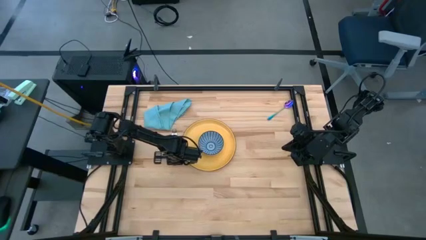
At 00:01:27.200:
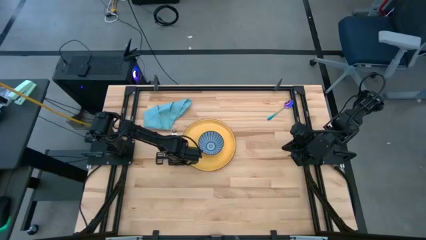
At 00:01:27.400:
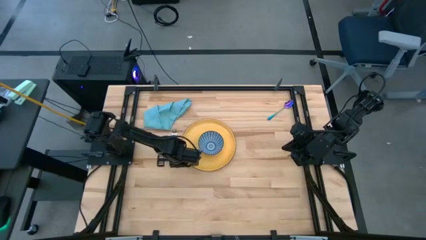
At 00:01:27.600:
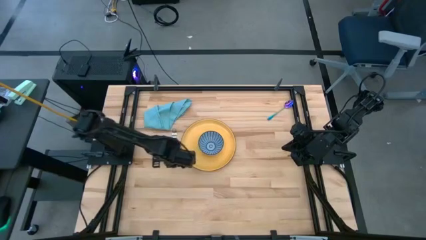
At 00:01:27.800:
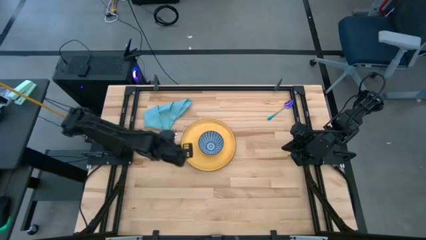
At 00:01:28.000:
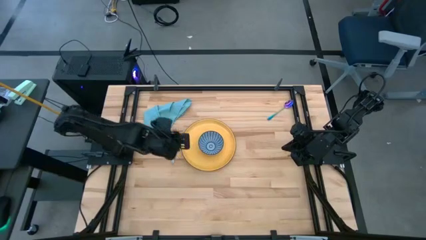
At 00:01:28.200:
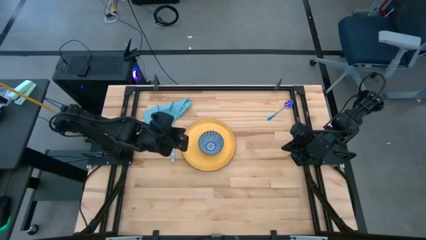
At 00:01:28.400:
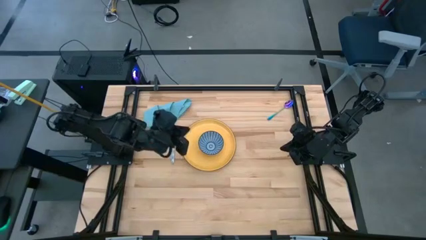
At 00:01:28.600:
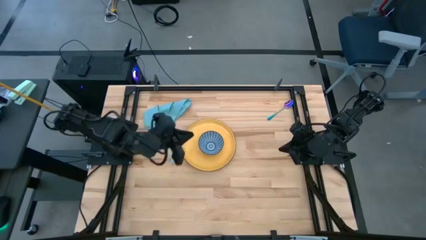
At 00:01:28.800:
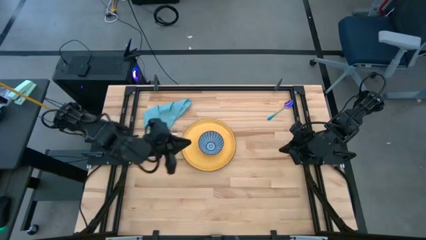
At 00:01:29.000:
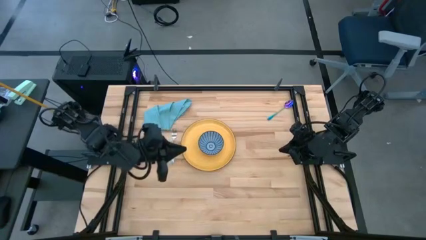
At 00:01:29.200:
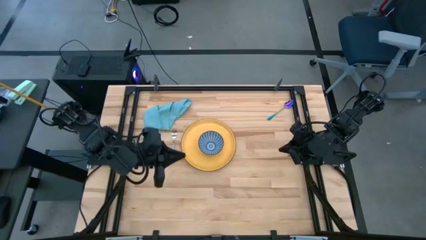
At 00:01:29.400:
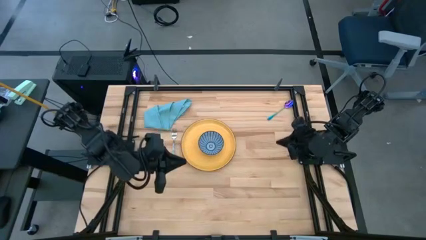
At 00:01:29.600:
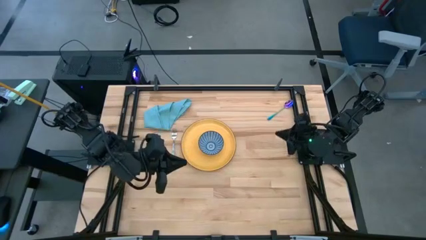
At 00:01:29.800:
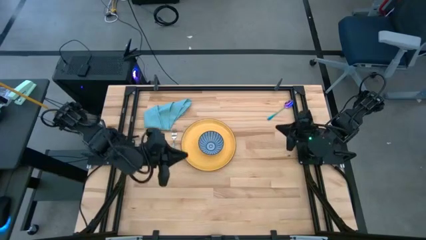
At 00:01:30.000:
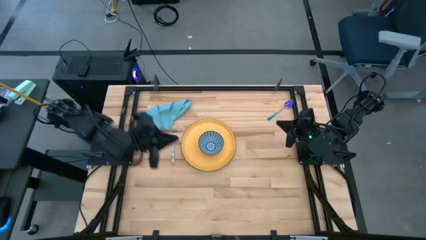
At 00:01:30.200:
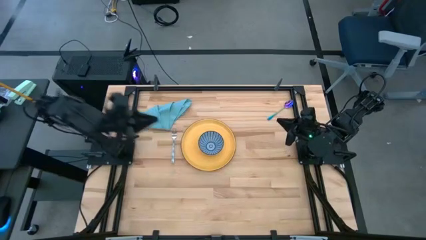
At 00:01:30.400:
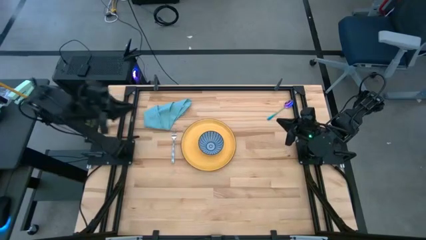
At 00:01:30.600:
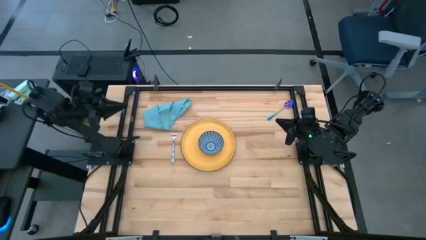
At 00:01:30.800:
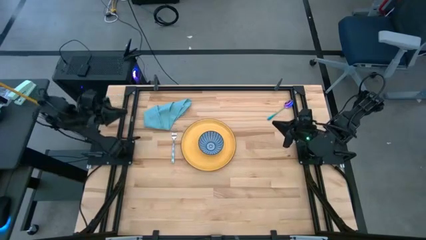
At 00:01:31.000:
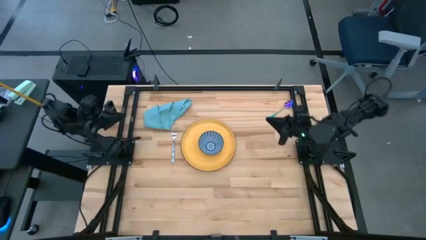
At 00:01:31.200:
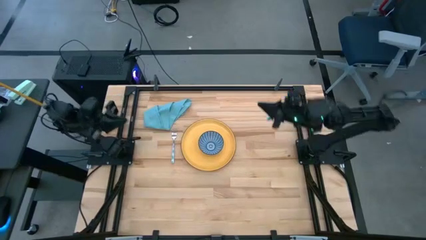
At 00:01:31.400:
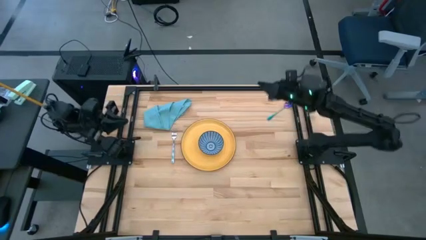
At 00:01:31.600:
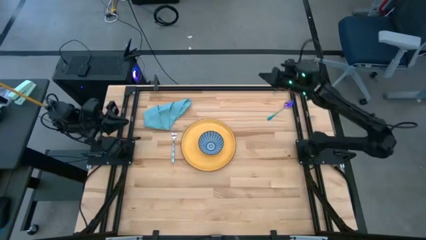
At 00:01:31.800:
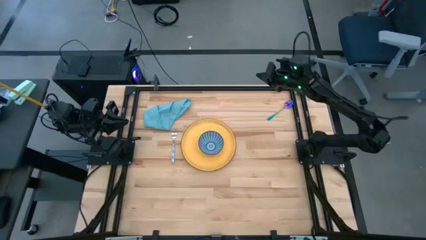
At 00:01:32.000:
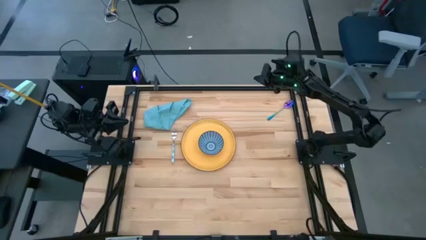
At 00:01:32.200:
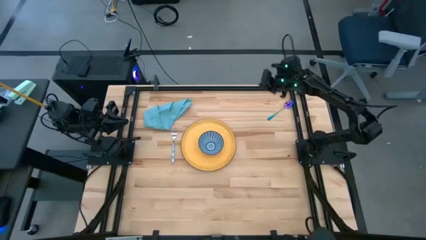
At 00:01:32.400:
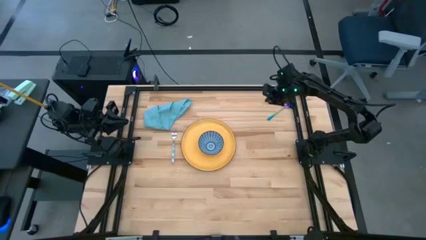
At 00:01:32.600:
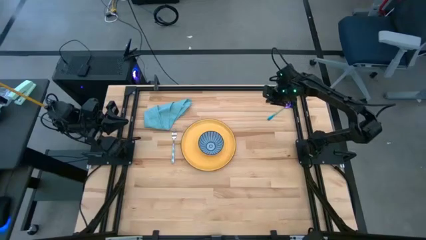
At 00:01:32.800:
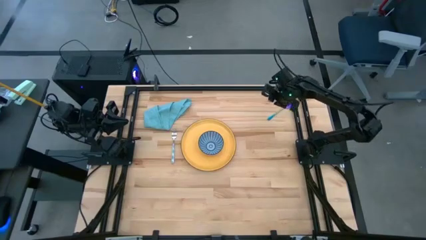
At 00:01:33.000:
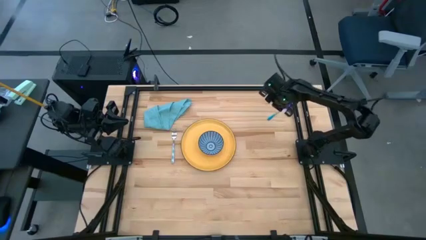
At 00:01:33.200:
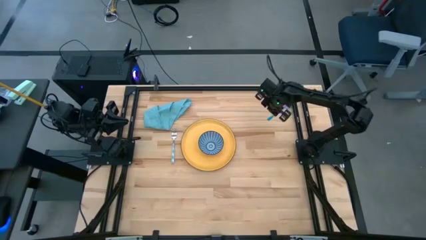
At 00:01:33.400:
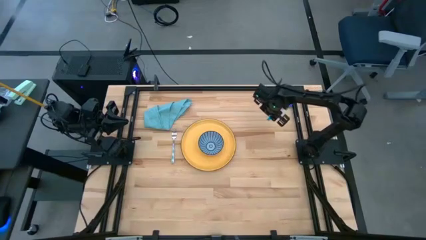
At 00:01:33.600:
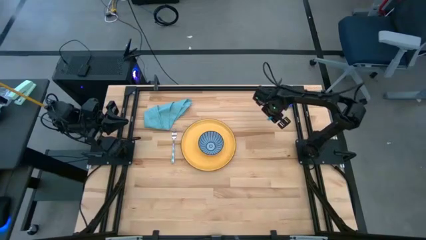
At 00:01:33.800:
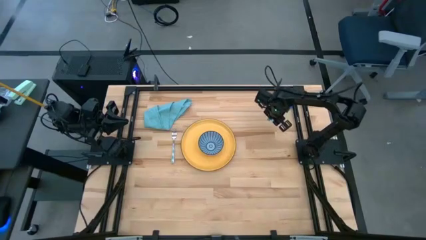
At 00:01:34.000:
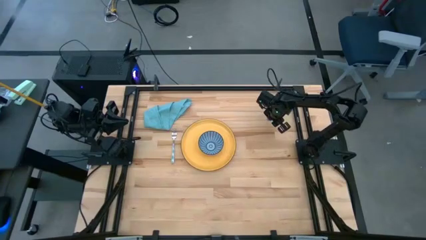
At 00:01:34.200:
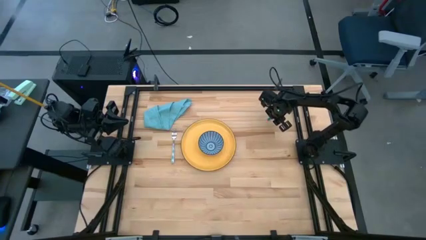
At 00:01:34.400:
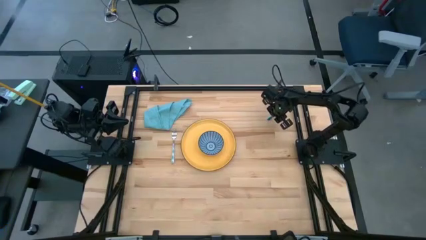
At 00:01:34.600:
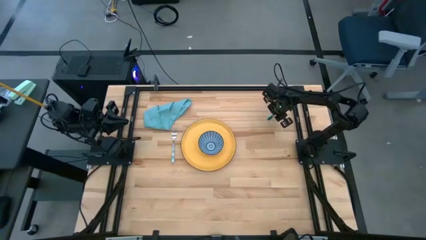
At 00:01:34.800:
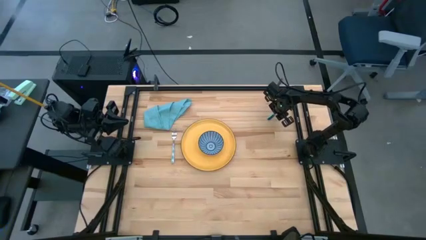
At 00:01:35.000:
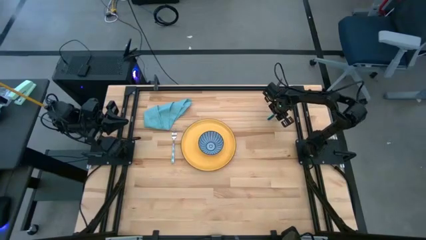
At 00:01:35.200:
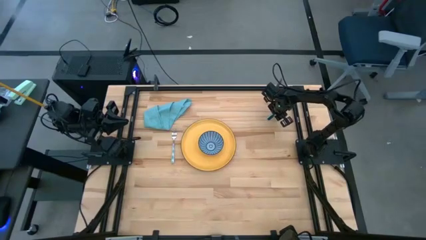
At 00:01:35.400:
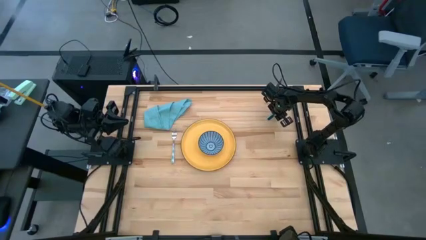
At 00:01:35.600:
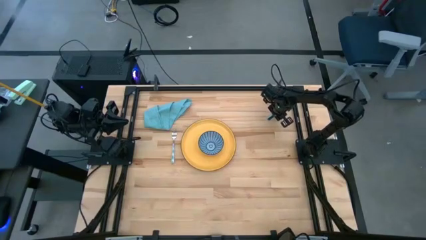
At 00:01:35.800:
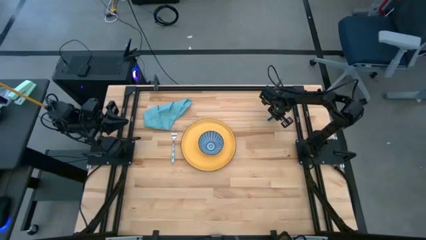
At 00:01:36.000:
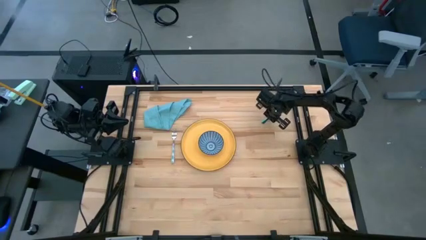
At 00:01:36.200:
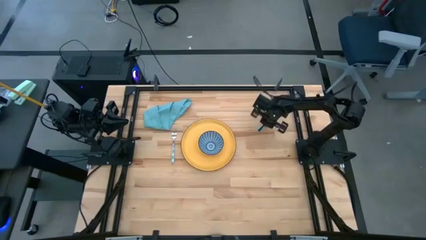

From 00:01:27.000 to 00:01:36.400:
Task: Set table place
Put the silver spoon into the blue and red bowl

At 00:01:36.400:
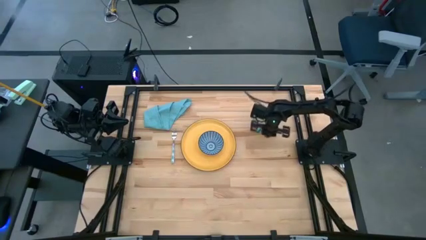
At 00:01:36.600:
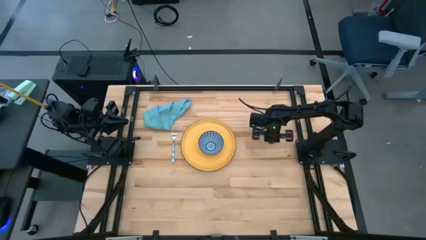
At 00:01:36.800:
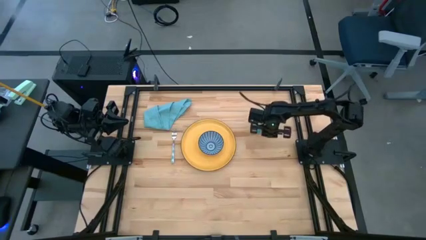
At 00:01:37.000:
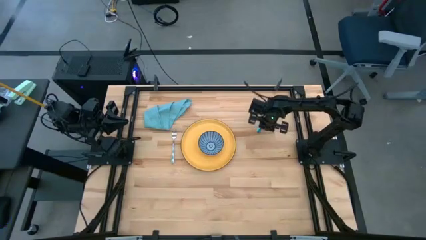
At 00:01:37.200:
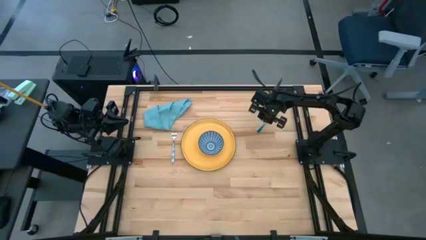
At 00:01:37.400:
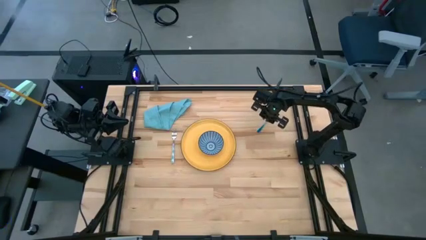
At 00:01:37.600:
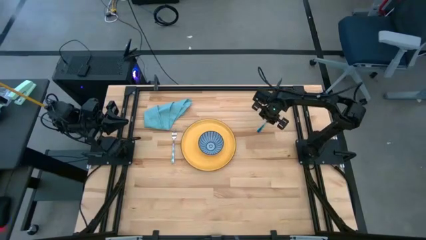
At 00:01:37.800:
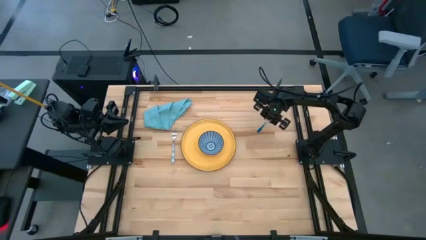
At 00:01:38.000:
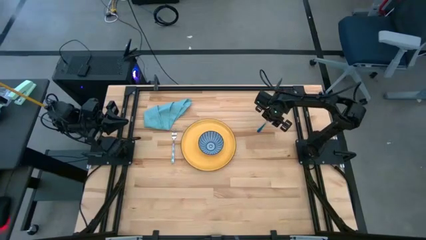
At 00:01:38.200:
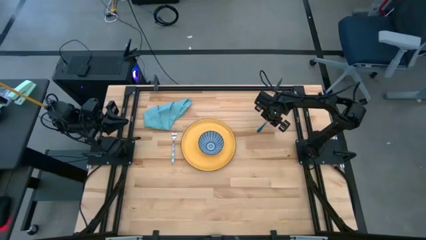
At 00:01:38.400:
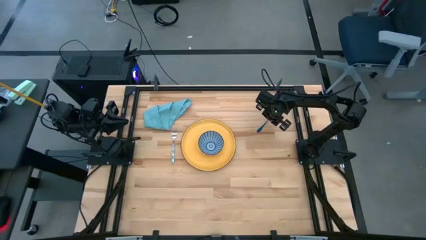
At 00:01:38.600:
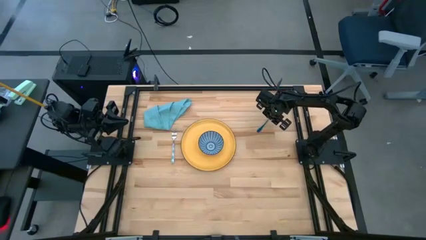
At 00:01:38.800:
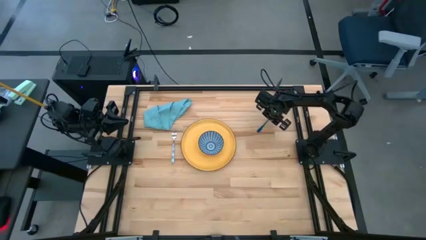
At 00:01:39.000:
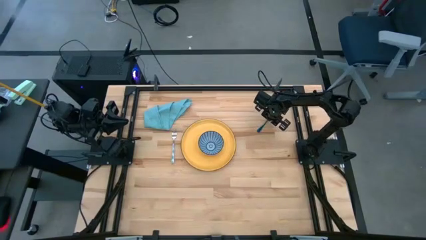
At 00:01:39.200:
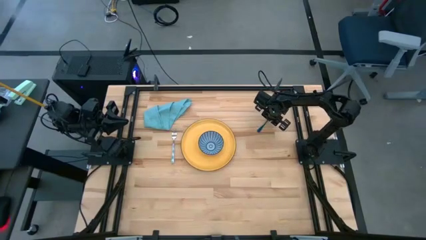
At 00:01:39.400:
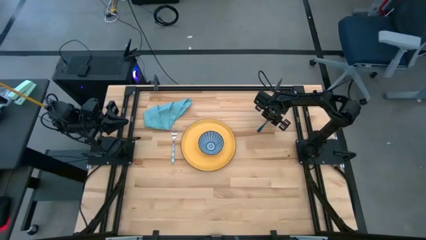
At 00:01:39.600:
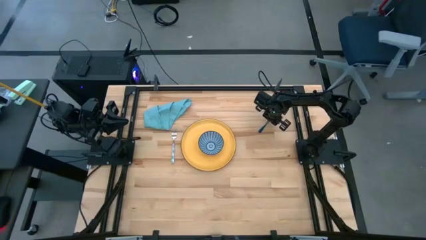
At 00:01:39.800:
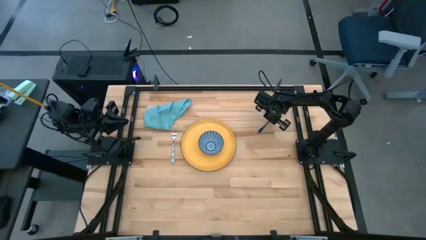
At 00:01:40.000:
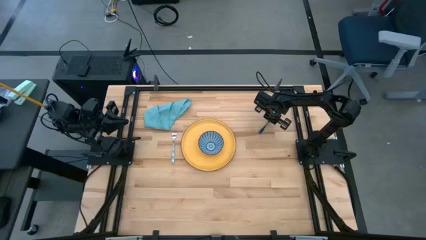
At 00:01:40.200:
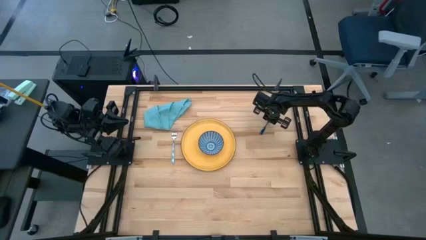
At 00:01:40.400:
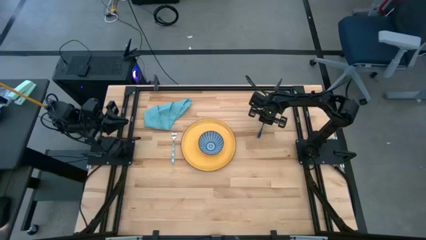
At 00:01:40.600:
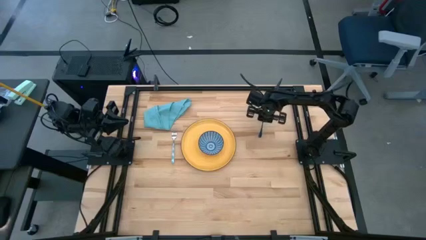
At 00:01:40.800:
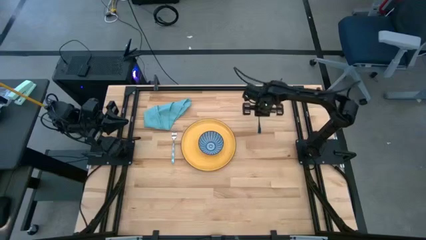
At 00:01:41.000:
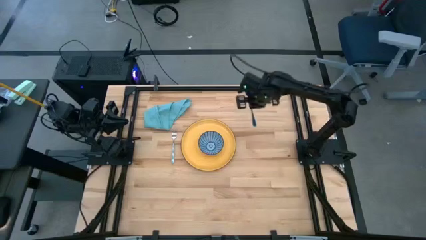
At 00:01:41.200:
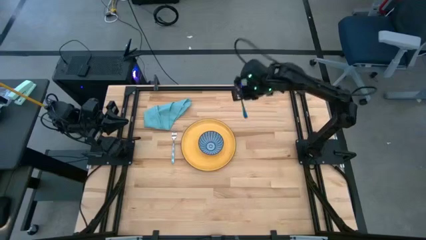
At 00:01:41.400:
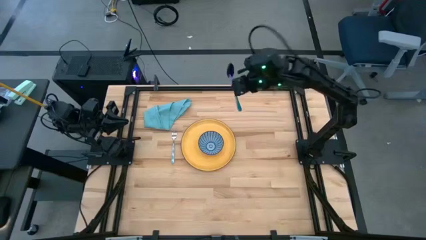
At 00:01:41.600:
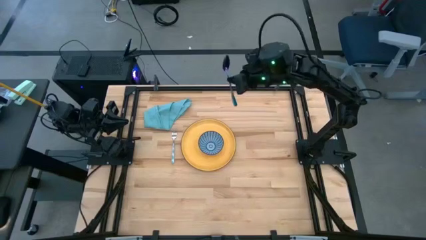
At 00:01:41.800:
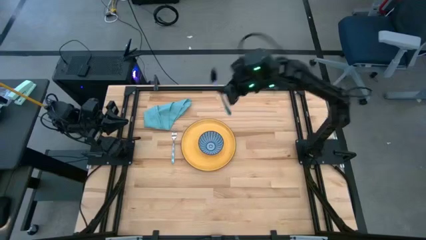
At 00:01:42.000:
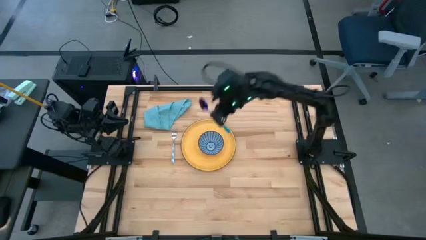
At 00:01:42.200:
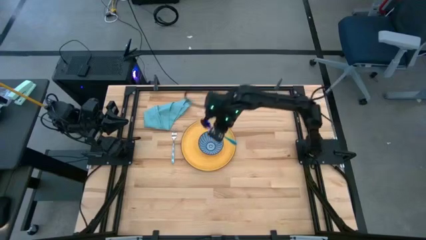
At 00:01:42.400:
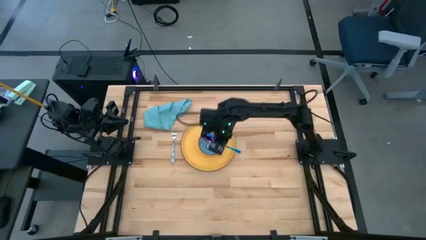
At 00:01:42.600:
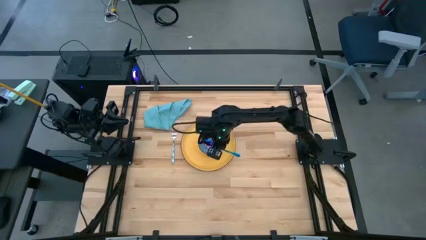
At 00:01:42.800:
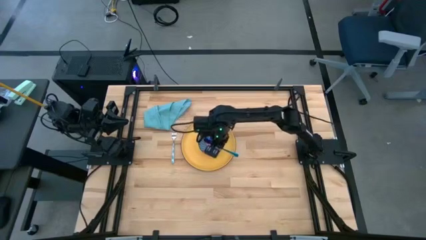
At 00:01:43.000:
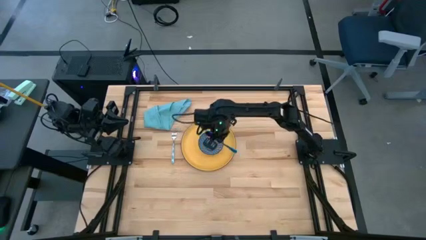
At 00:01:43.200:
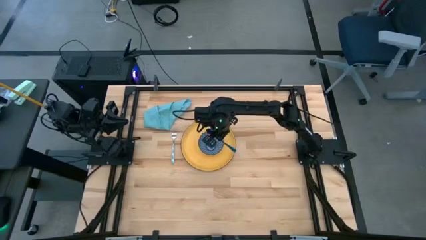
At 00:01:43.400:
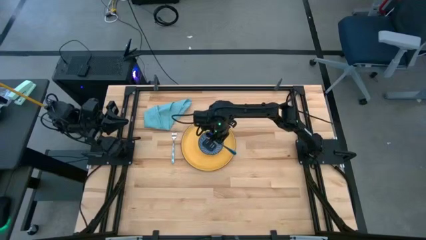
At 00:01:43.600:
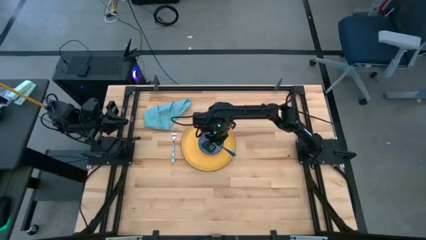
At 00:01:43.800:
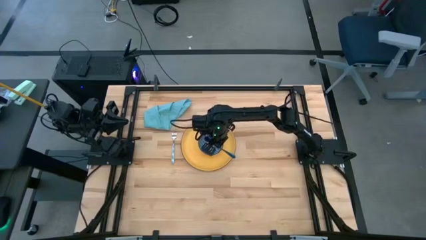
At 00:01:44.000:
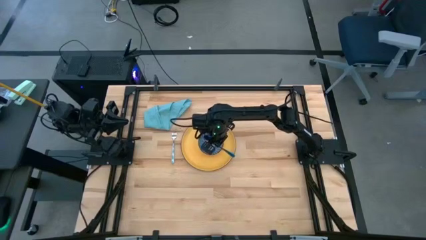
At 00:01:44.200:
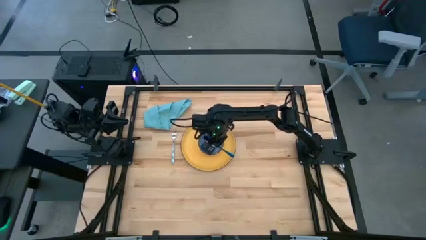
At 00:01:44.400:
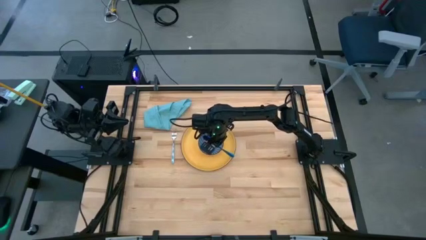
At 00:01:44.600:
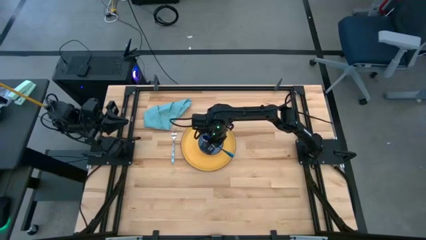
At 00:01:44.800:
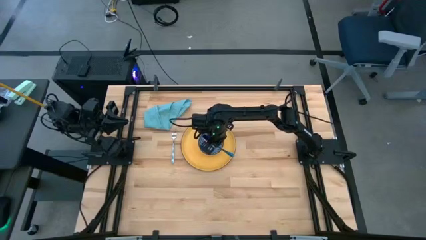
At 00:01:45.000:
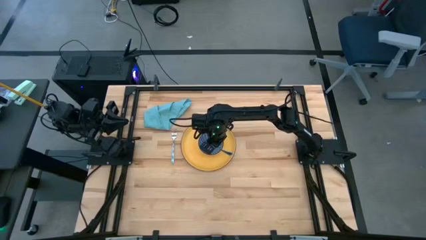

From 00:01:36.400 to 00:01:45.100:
Put the silver spoon into the blue and red bowl
